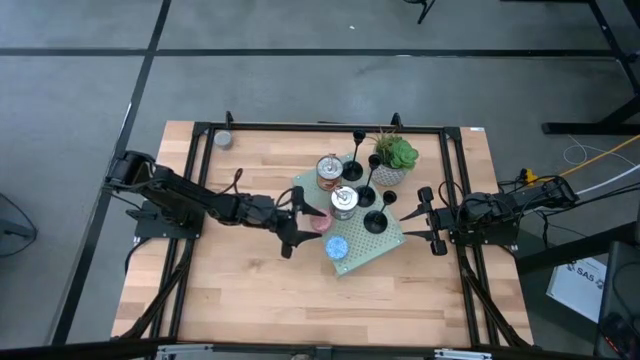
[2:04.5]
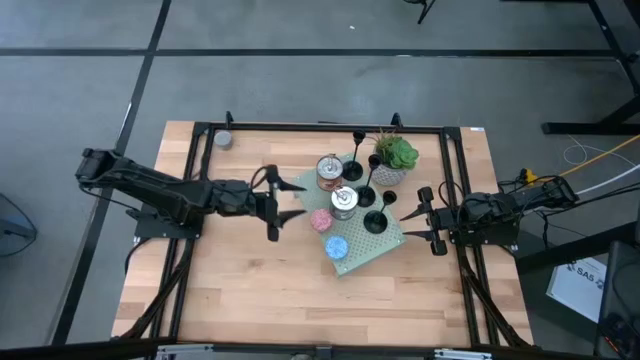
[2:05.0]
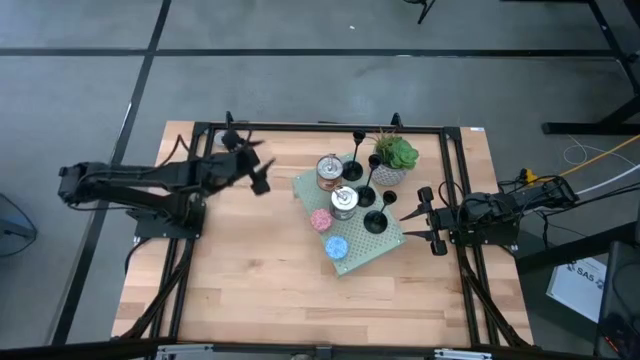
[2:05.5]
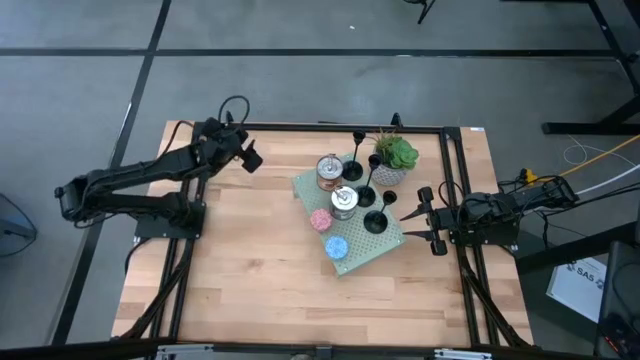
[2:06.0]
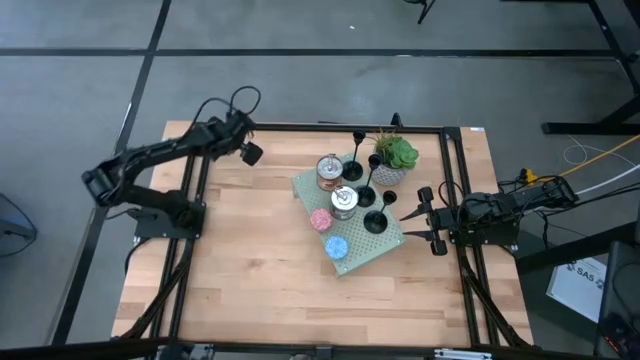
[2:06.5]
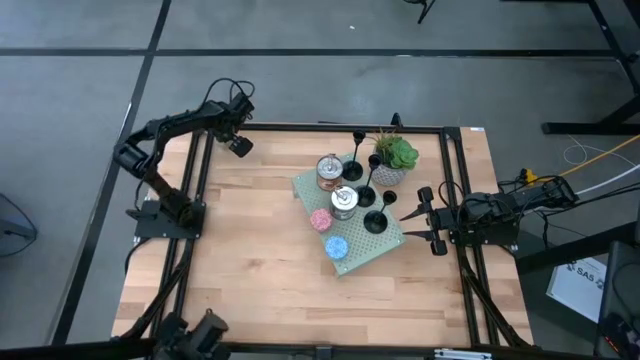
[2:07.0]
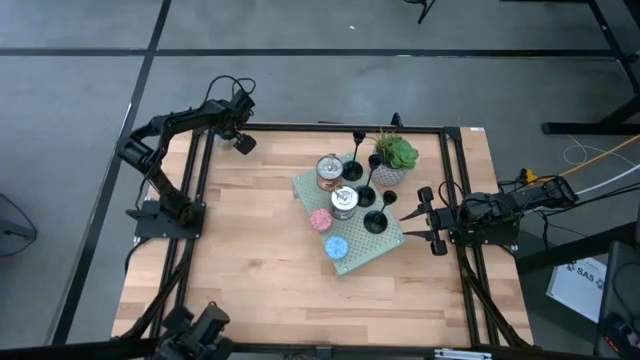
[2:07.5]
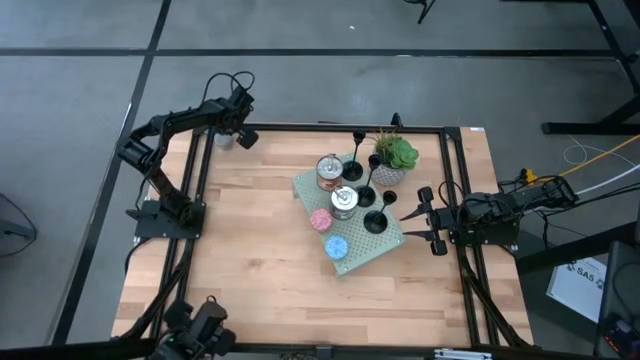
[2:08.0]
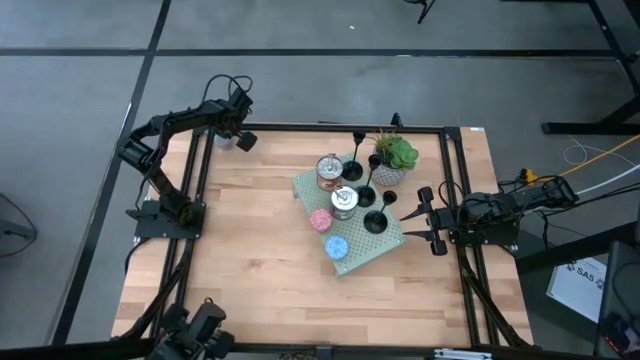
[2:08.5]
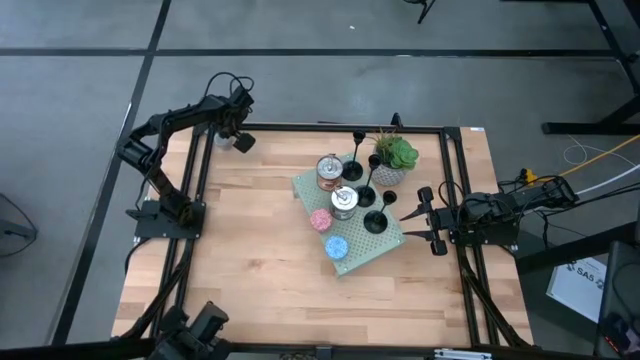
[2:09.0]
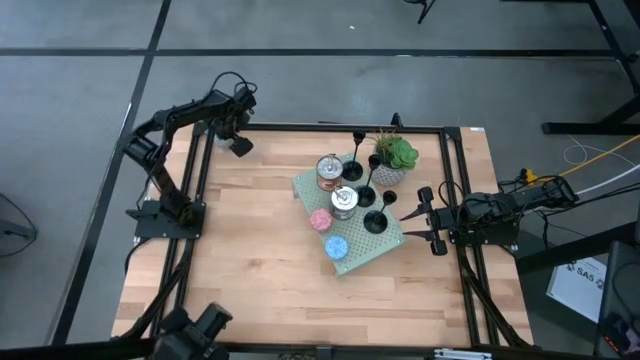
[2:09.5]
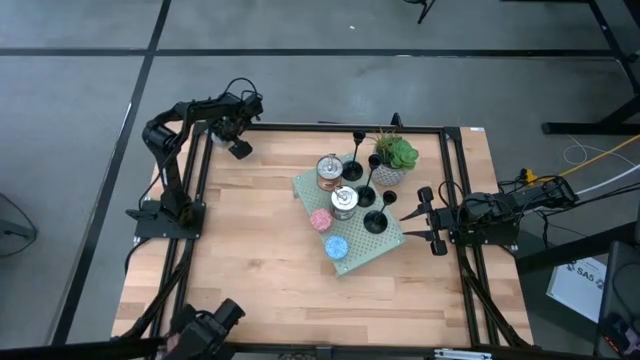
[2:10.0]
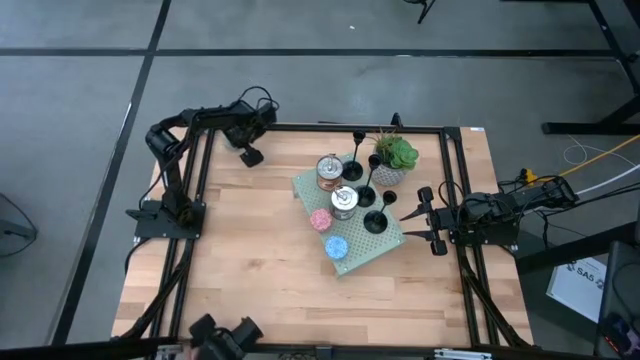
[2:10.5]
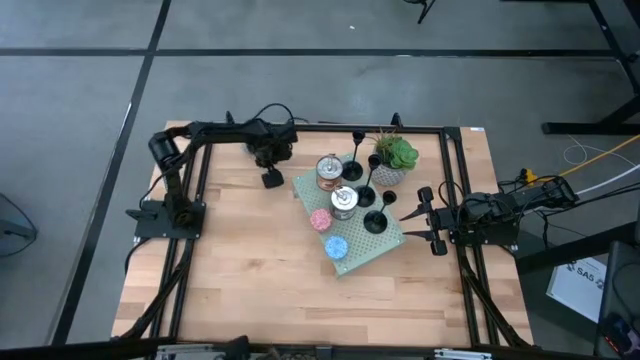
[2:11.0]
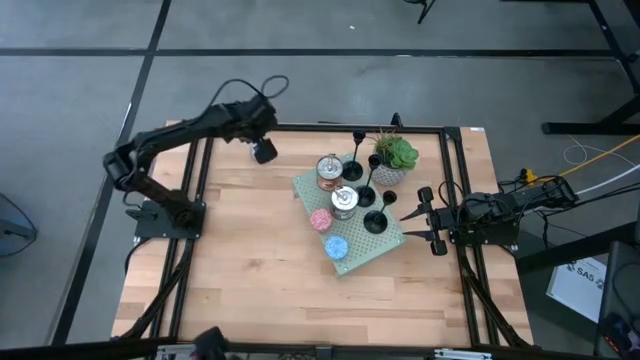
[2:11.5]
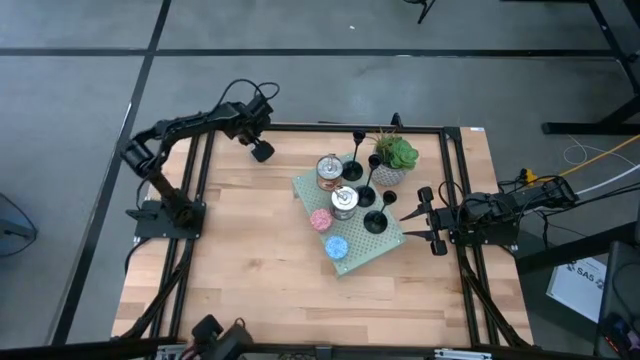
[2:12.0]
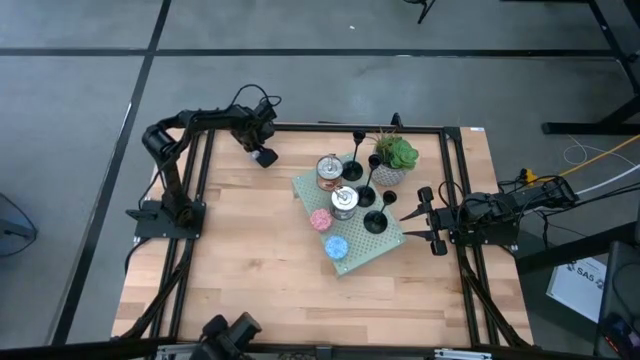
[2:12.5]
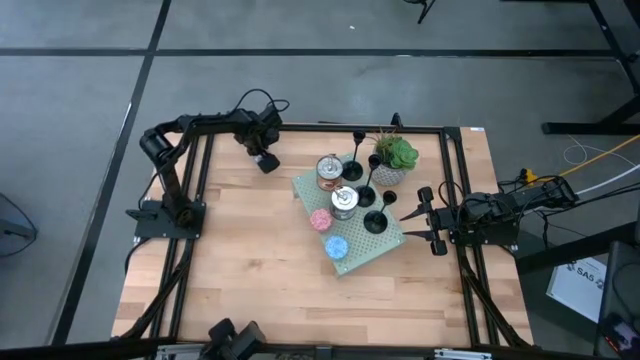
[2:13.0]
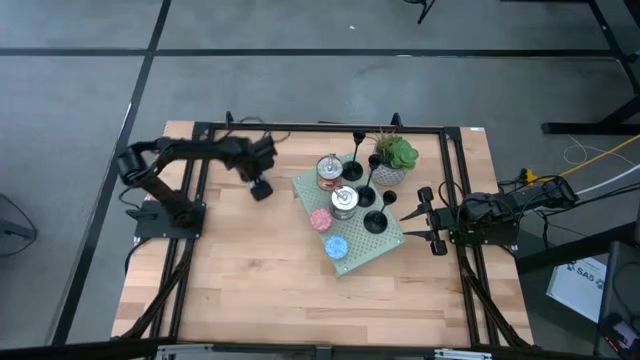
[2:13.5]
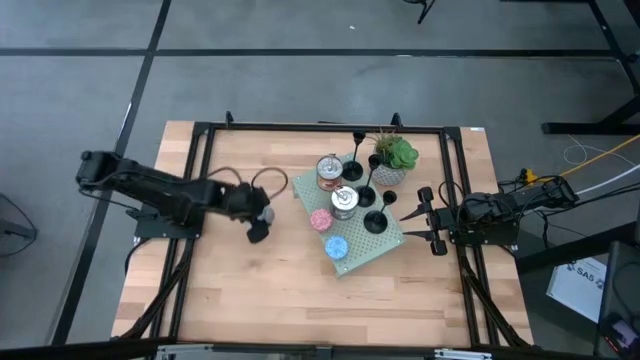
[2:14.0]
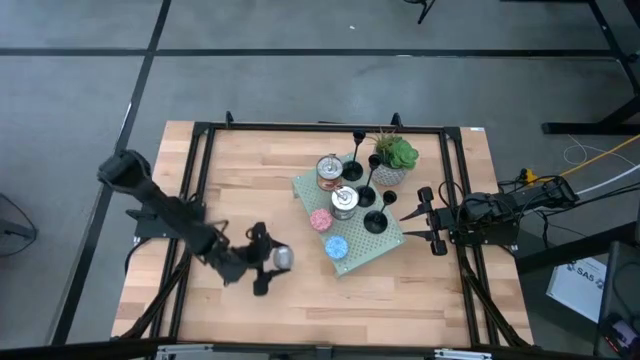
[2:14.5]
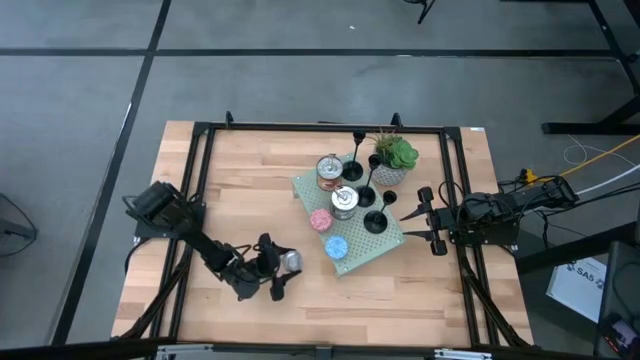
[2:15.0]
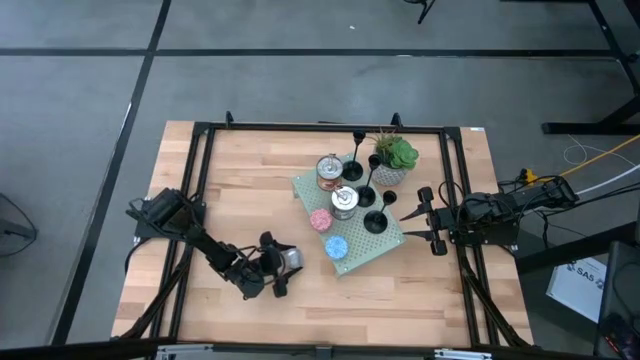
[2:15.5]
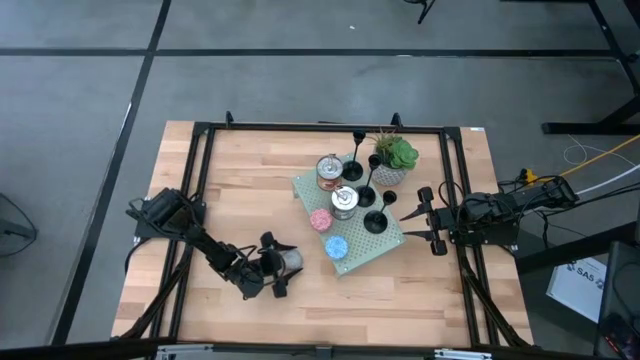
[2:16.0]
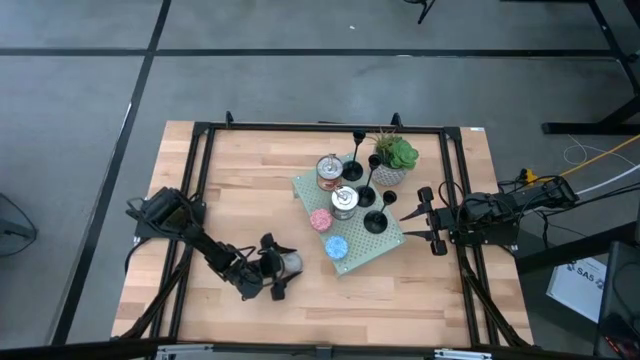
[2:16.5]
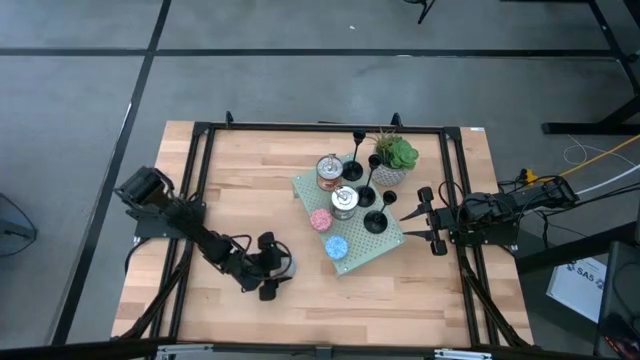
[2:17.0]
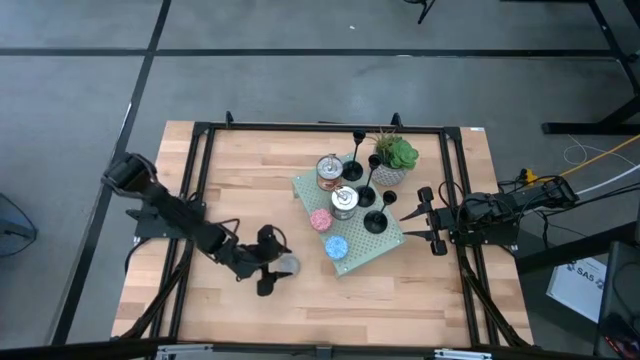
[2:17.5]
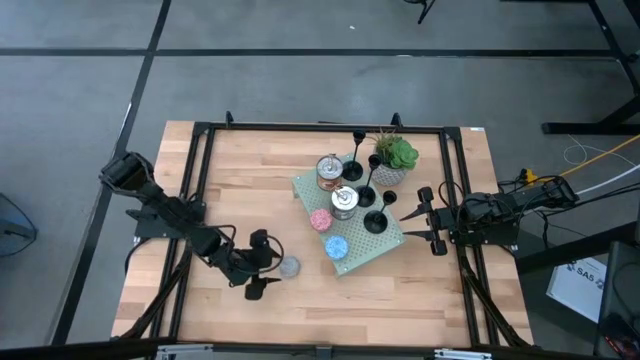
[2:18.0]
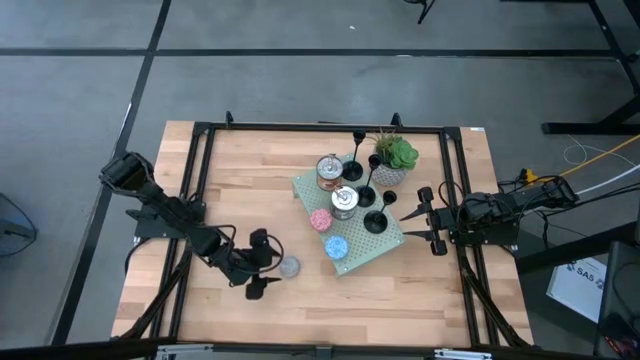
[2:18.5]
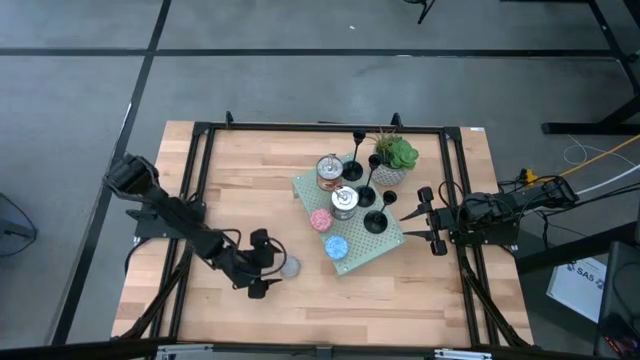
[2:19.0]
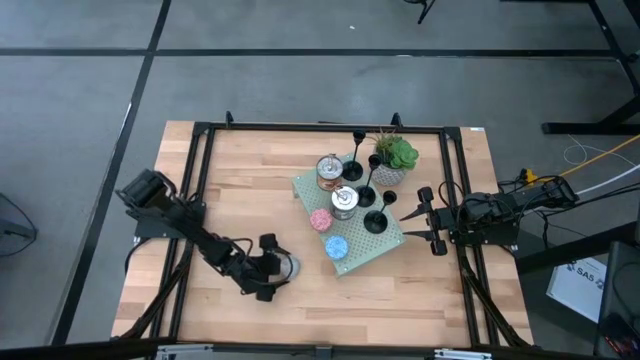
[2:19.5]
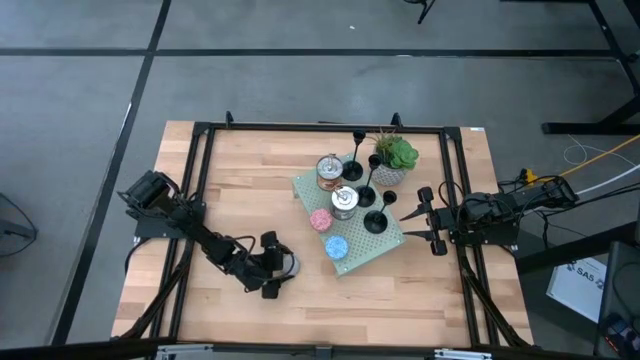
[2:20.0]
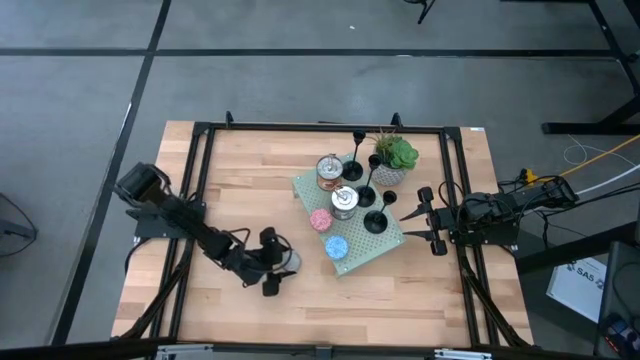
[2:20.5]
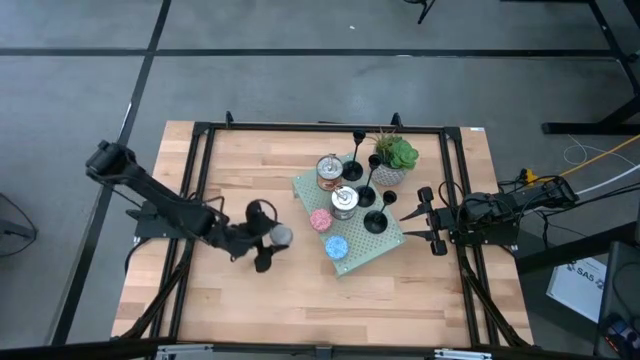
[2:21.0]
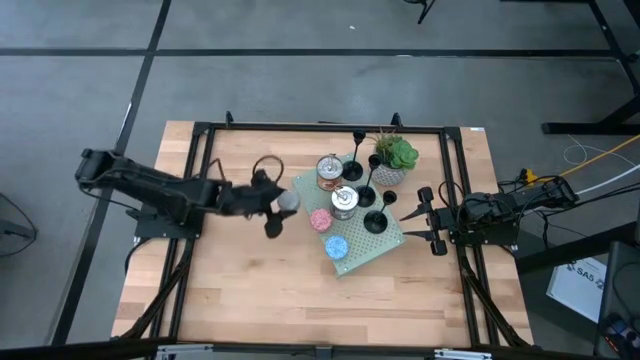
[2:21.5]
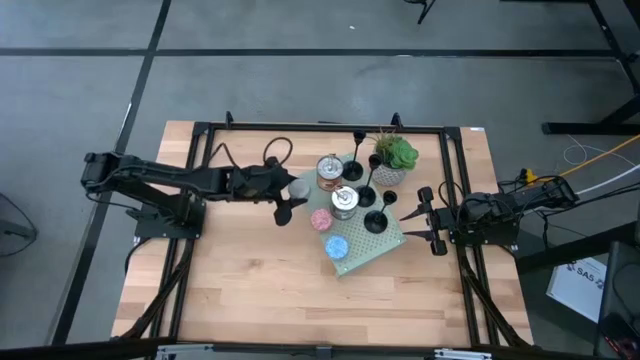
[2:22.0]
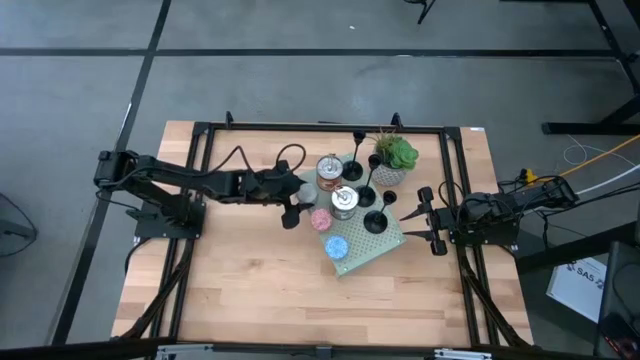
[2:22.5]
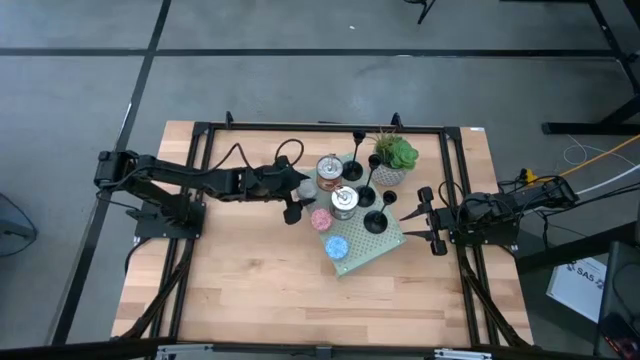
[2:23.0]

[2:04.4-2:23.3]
Task: Pick & Place candle stick holders
Put the light blue scented candle on the shelf aligned with the other scented candles

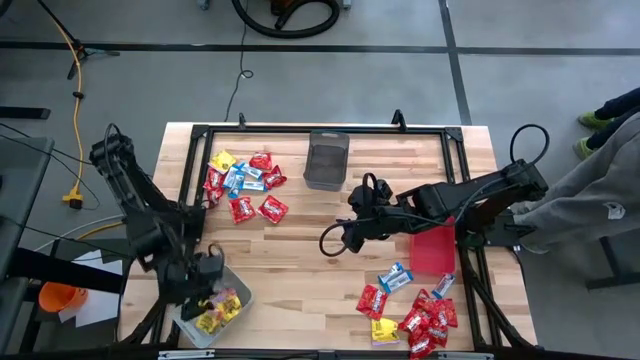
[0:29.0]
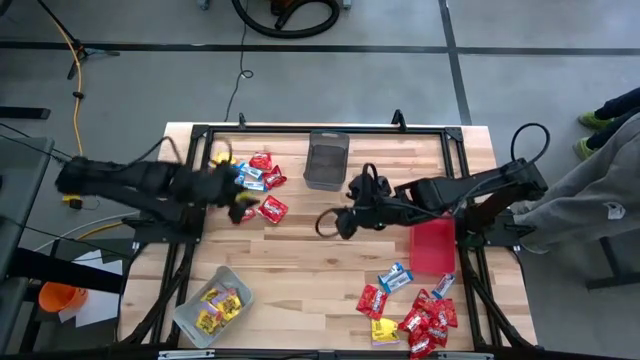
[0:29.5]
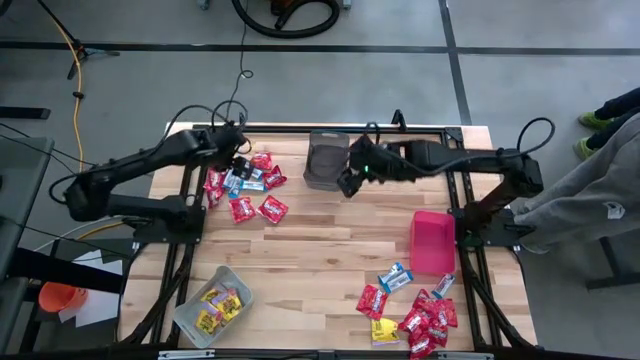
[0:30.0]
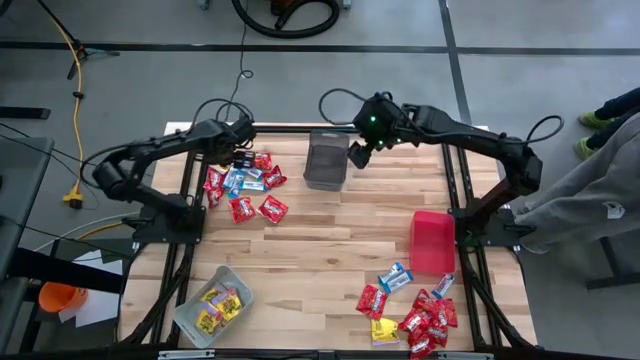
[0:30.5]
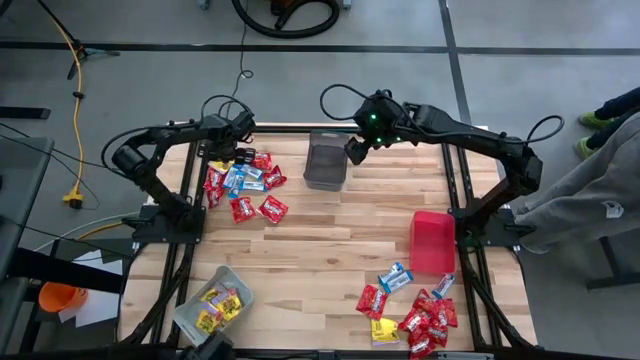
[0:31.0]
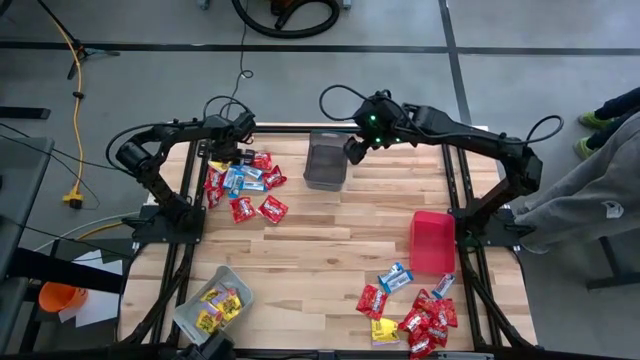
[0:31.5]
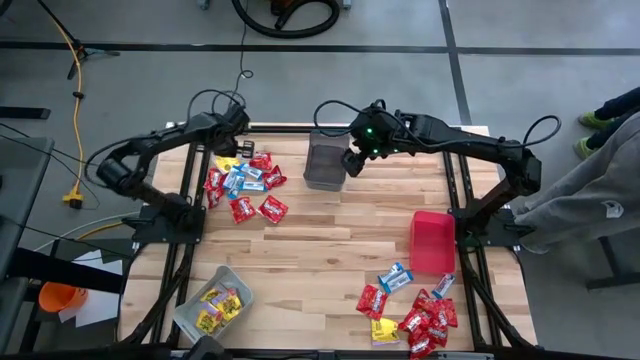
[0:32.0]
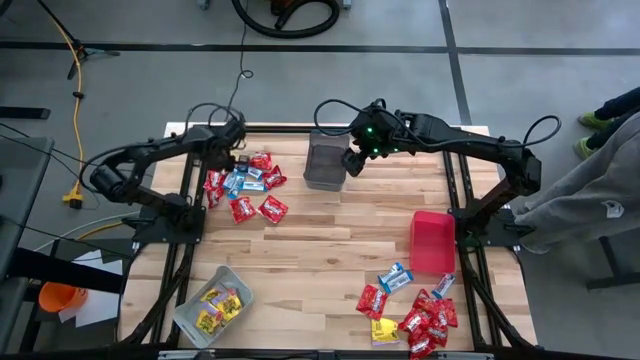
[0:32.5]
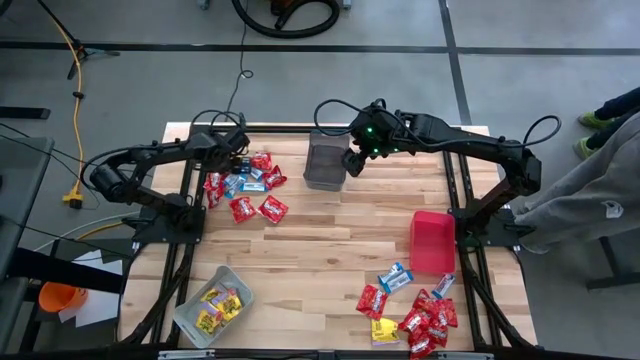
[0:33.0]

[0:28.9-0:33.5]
Task: Sort candy
Put the yellow candy pack into the gray bin
